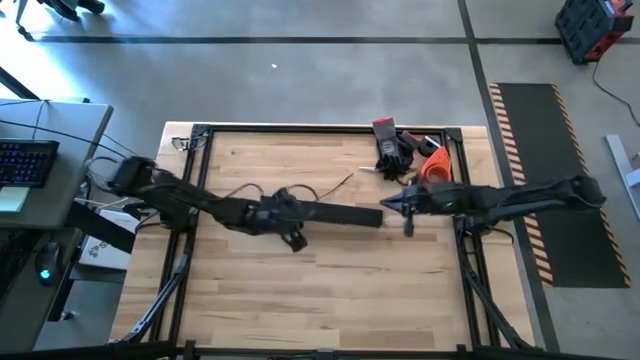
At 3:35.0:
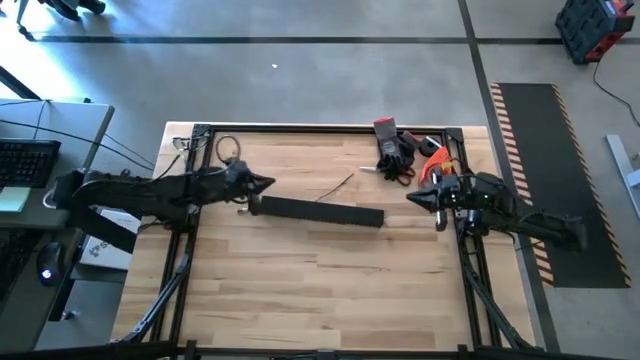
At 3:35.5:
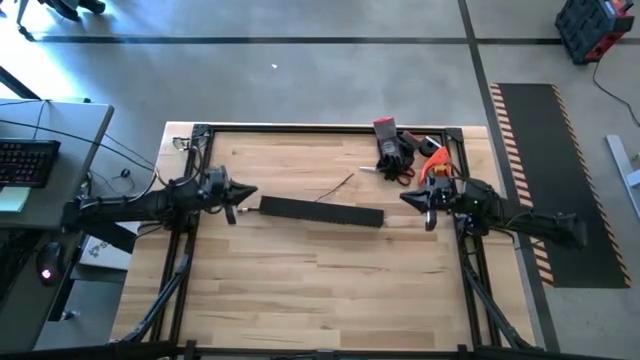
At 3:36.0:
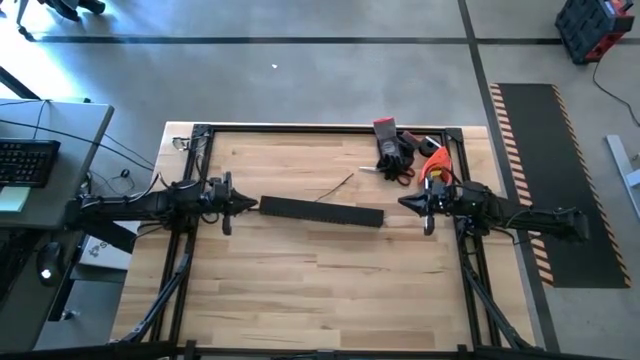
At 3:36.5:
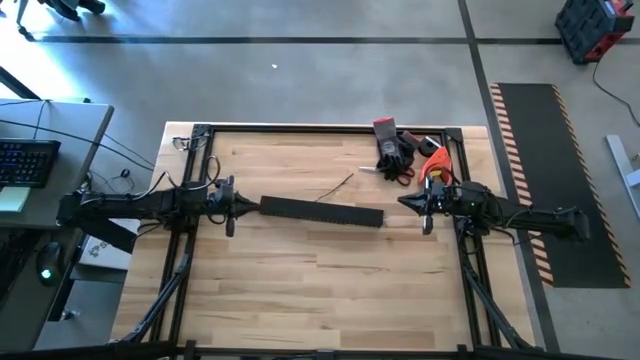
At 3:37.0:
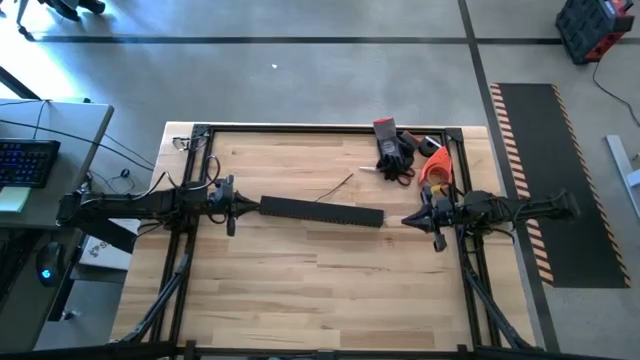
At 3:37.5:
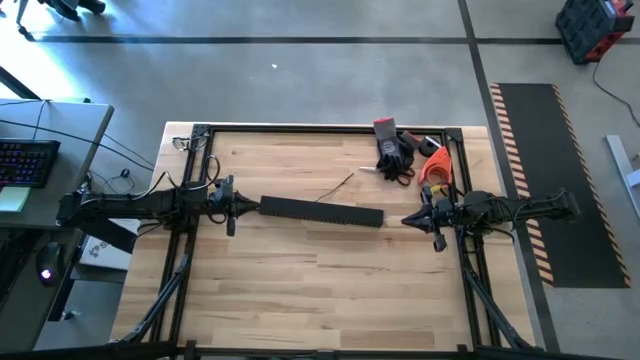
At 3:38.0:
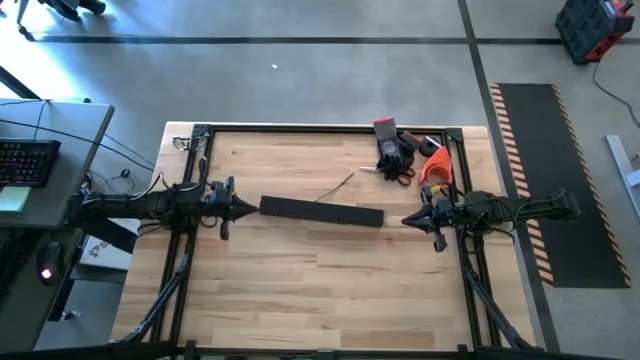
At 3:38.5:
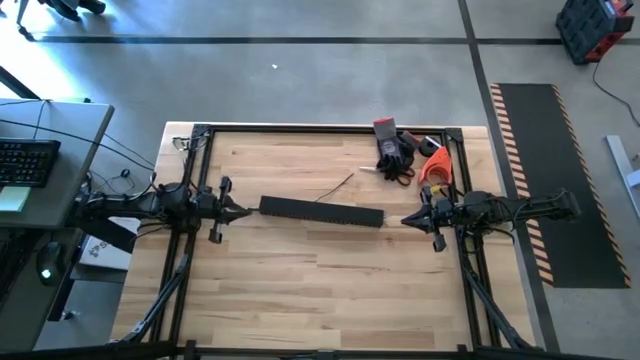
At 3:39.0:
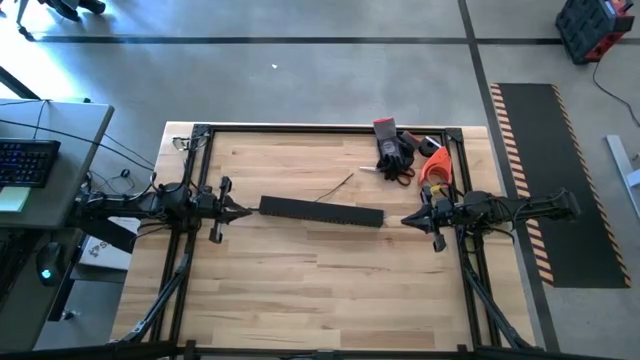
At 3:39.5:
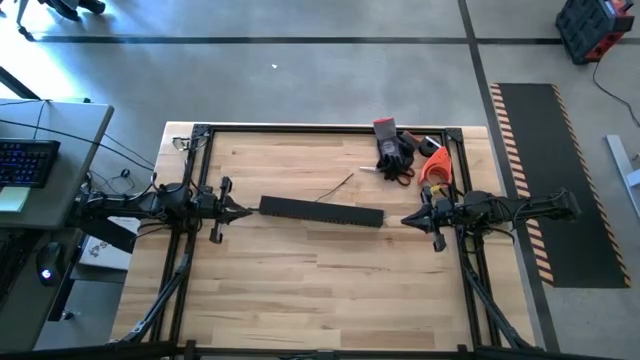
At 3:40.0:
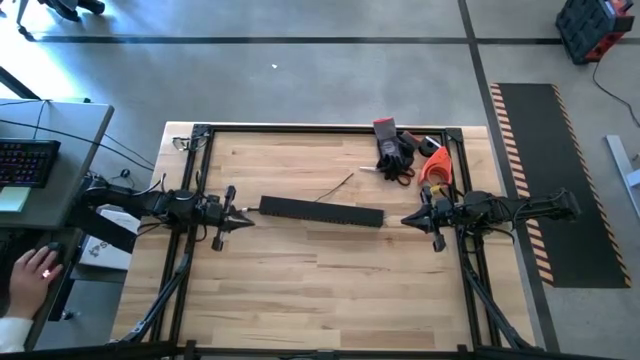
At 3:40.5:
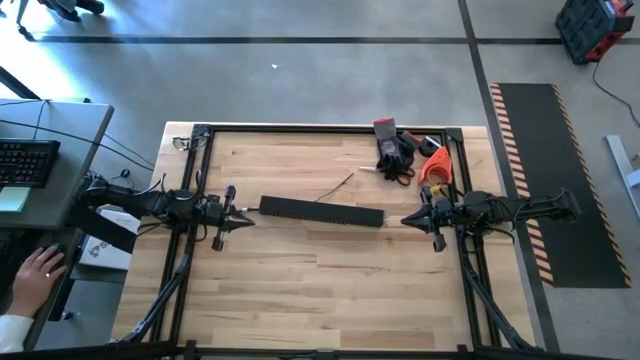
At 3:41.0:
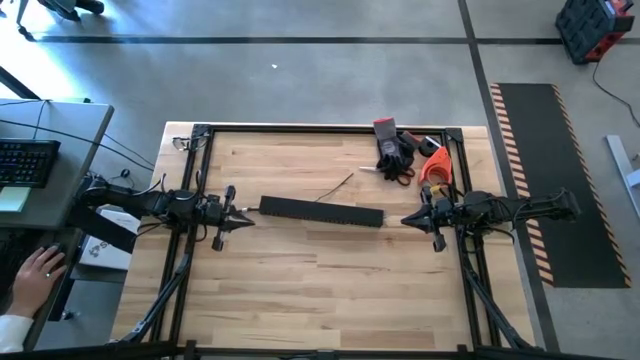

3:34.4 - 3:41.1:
Task: Ziptie cables
Return to Home Position

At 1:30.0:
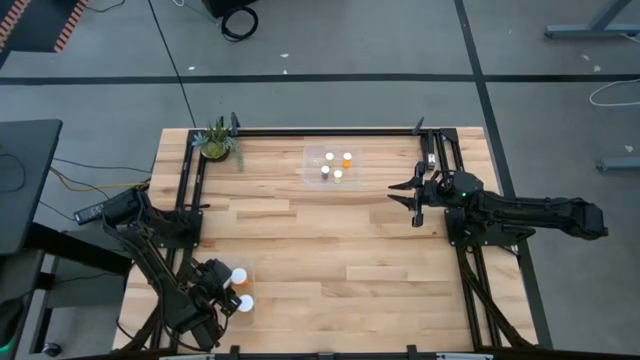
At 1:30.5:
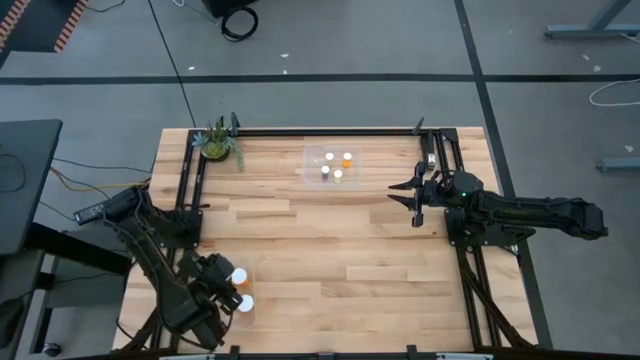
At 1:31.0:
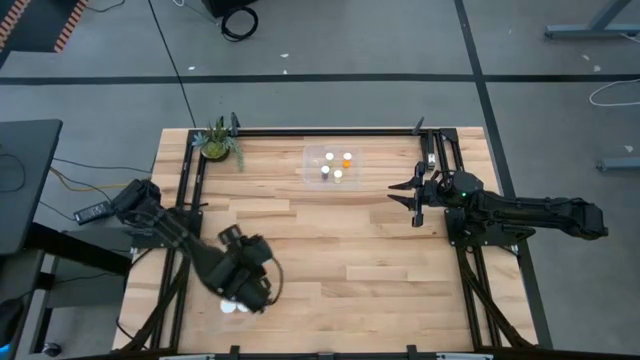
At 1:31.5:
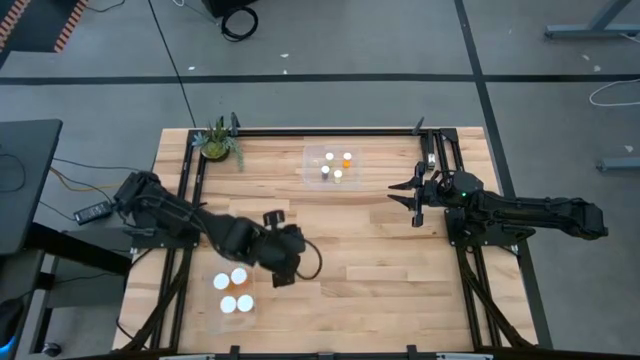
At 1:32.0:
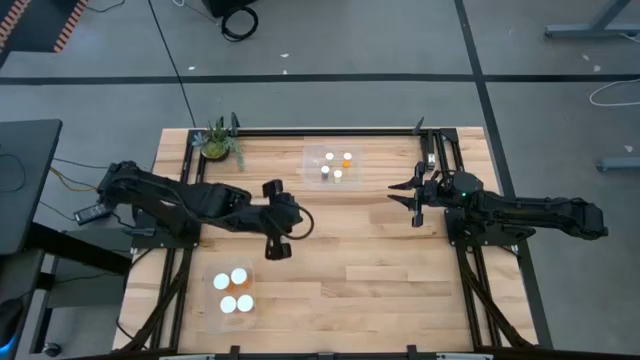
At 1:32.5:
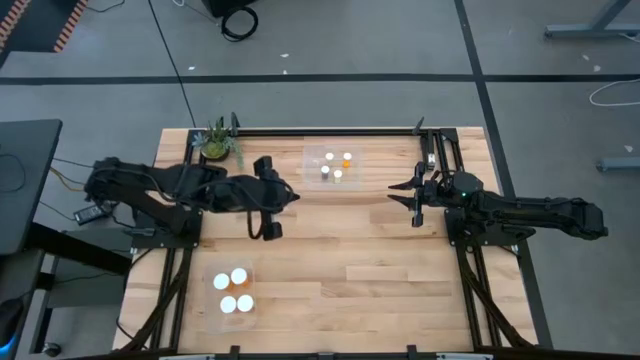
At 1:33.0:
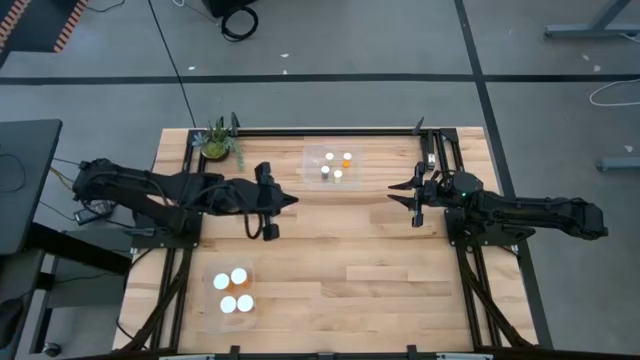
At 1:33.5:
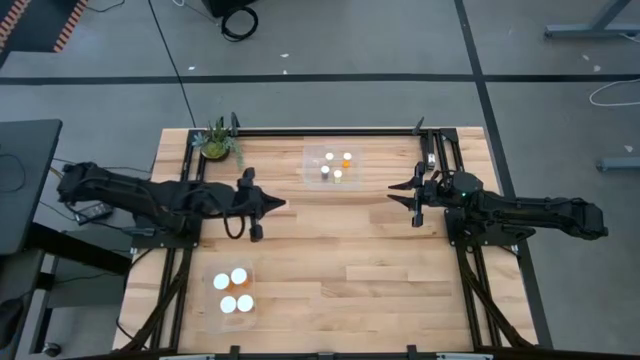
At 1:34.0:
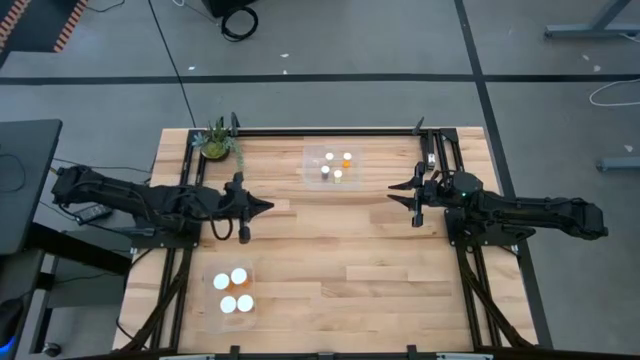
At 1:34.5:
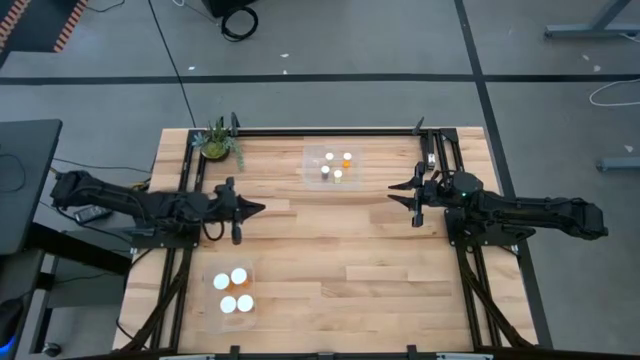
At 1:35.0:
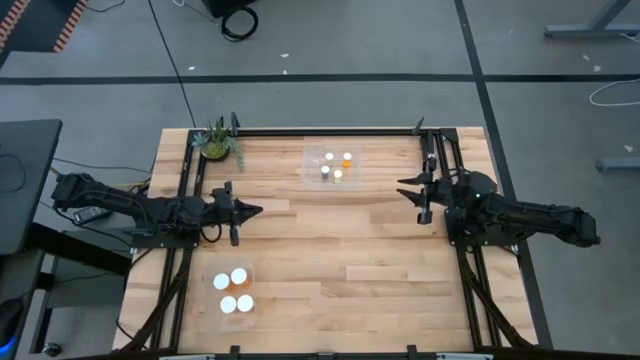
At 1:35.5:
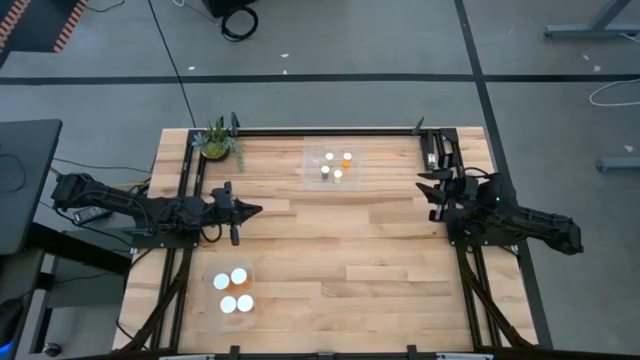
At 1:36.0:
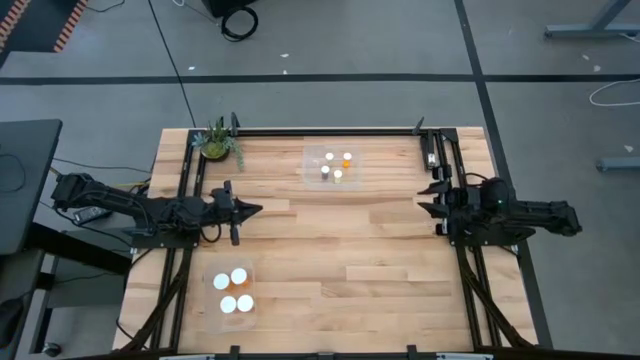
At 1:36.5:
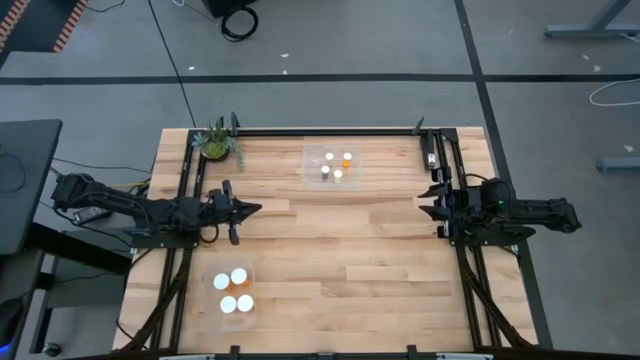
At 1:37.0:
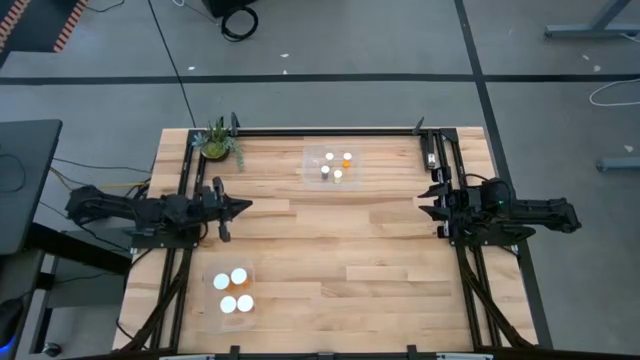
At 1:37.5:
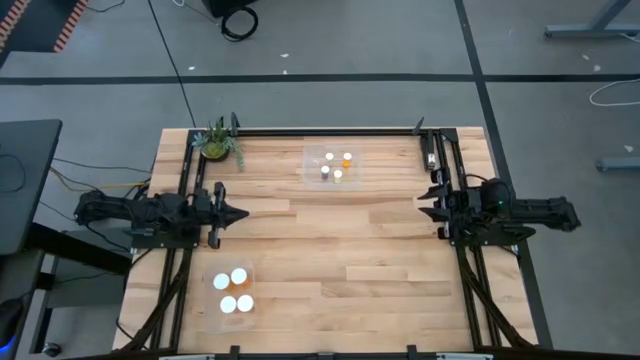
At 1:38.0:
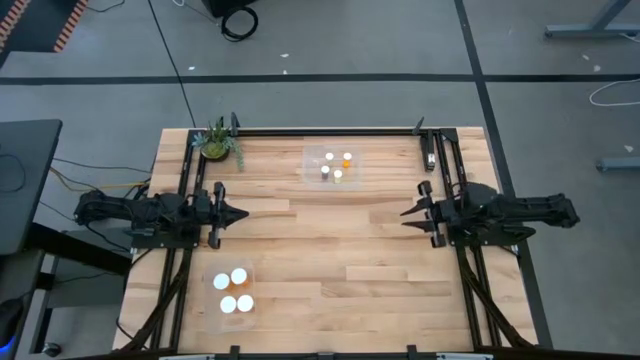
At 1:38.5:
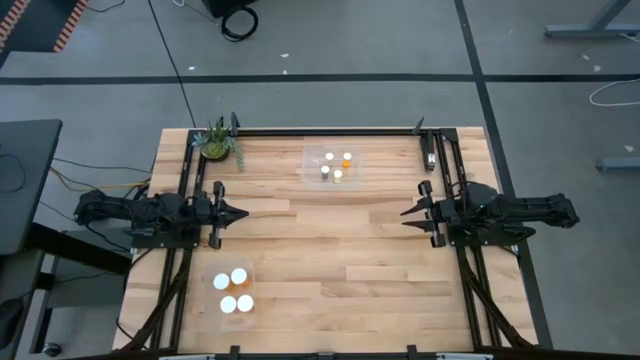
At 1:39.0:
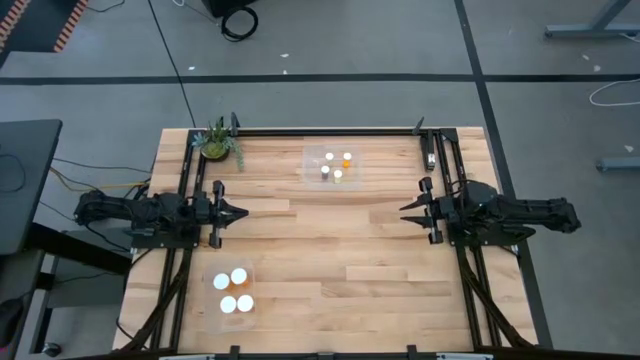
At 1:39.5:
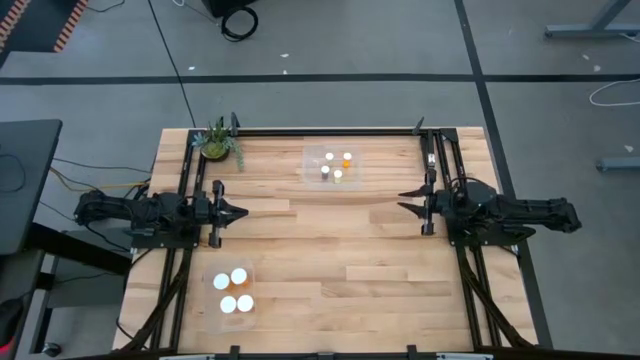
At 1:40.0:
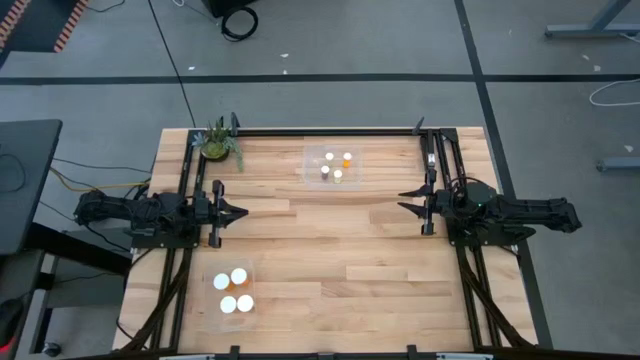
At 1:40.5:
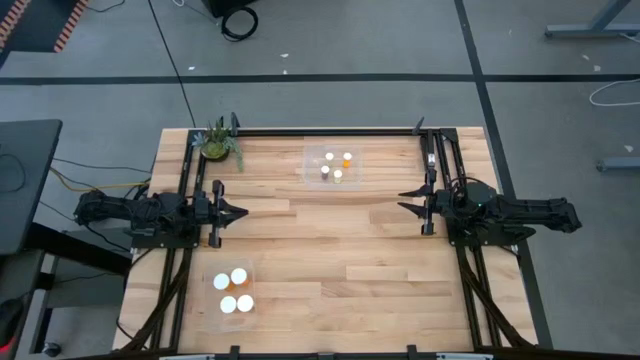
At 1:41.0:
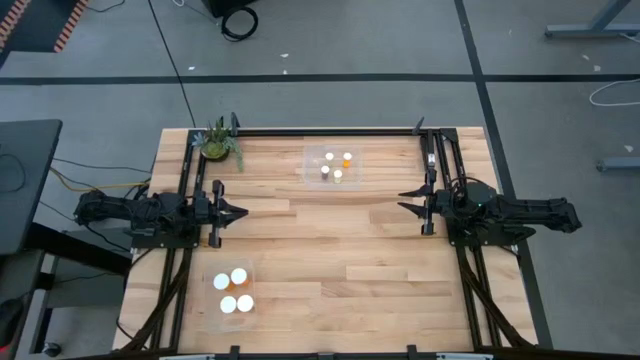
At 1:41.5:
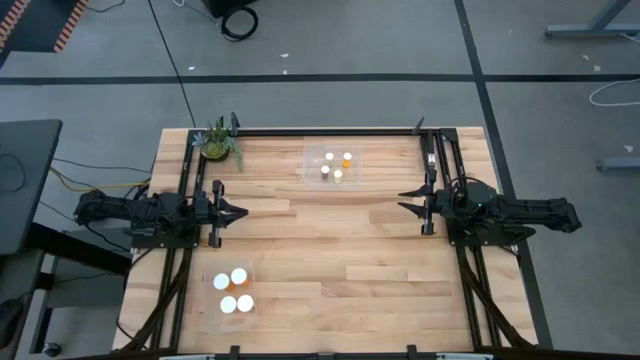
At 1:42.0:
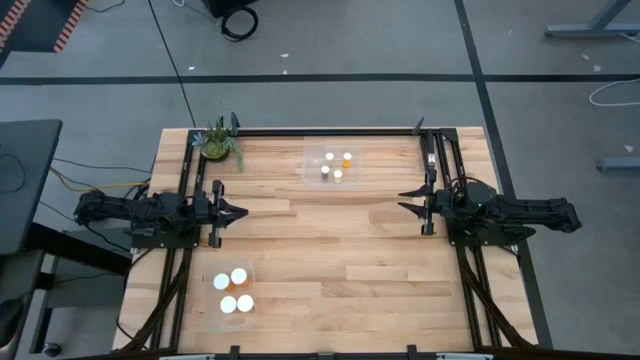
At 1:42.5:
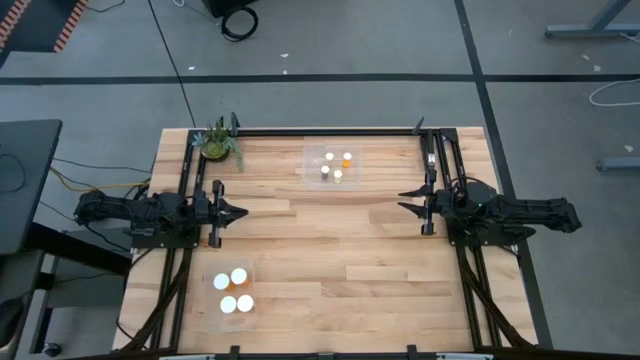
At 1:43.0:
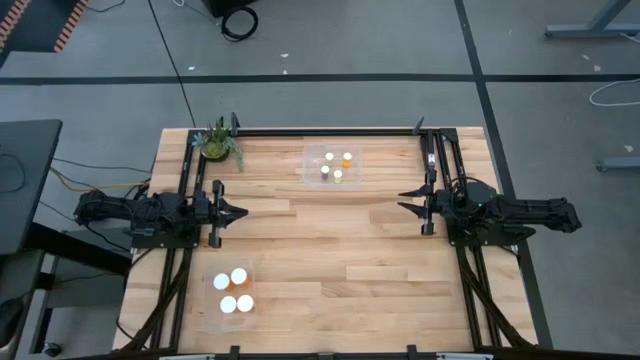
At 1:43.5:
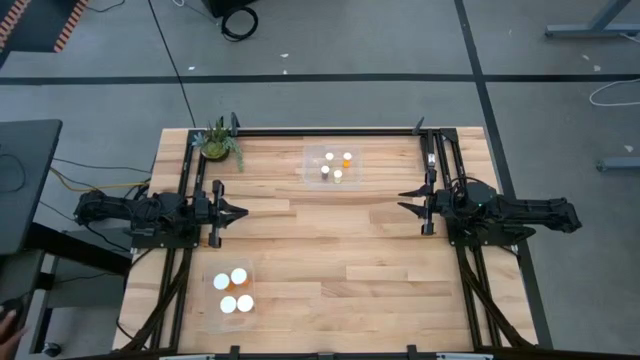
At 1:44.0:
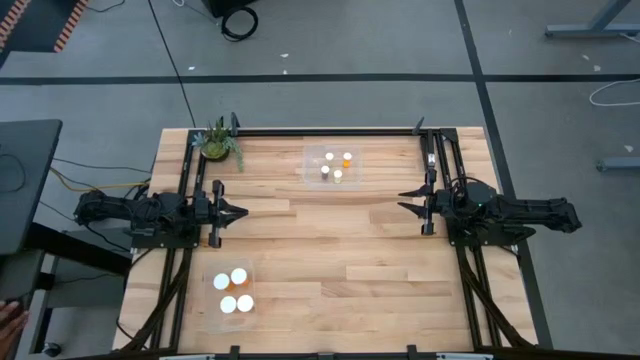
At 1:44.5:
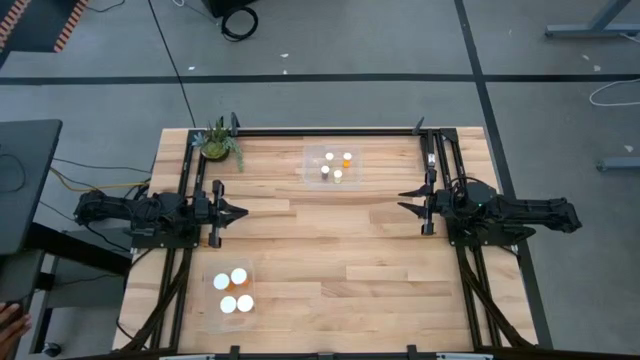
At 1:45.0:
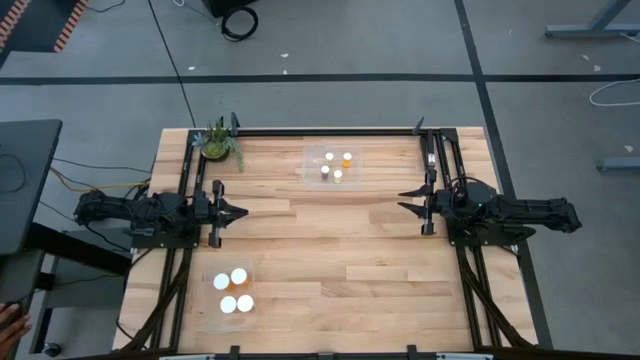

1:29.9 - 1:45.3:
Task: Pick and place medicine bottles into bin by pill shape (circle, oval)
Return to Home Position
